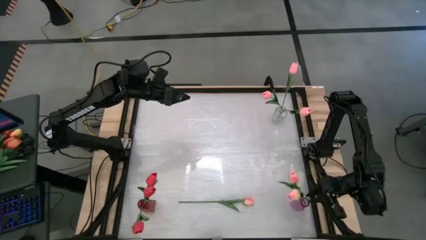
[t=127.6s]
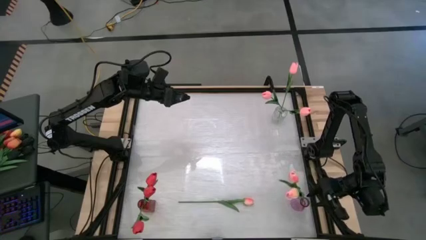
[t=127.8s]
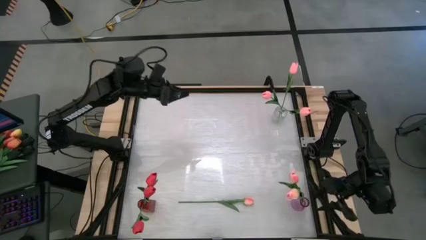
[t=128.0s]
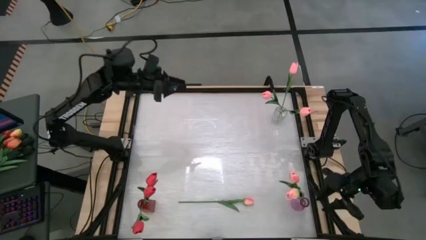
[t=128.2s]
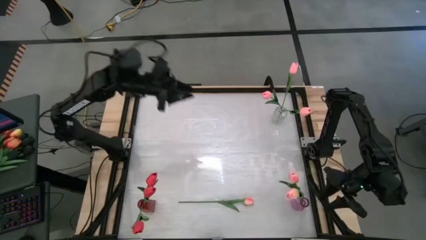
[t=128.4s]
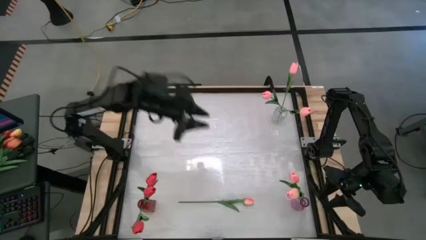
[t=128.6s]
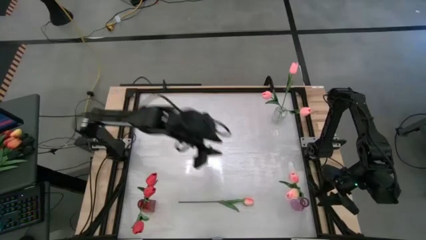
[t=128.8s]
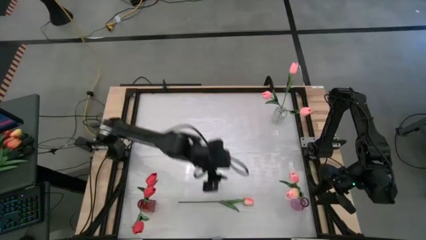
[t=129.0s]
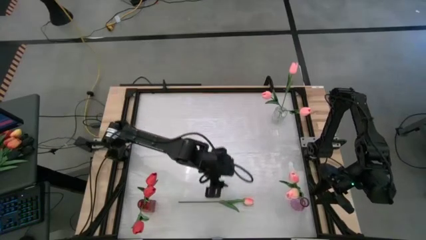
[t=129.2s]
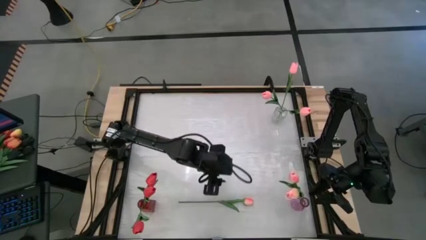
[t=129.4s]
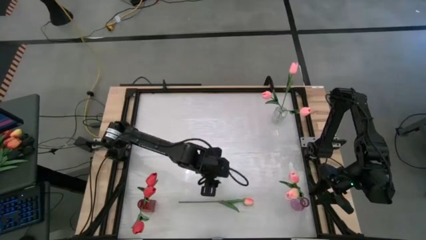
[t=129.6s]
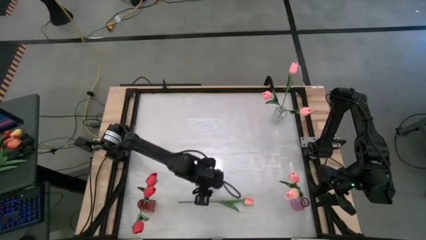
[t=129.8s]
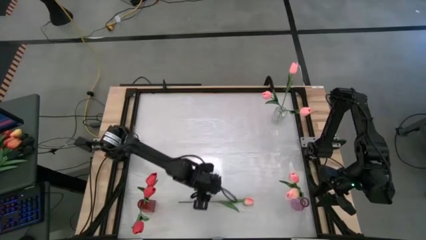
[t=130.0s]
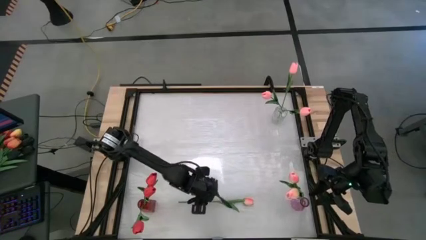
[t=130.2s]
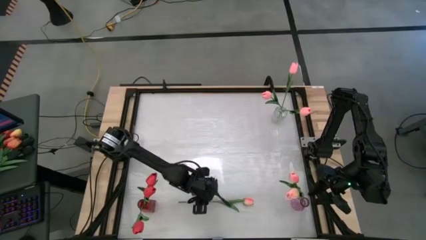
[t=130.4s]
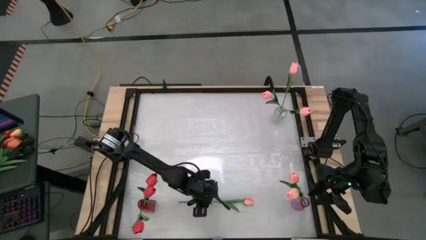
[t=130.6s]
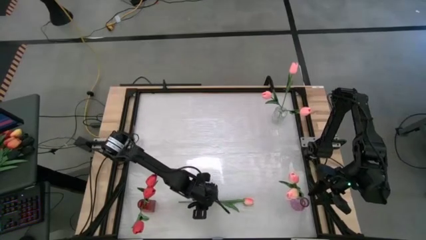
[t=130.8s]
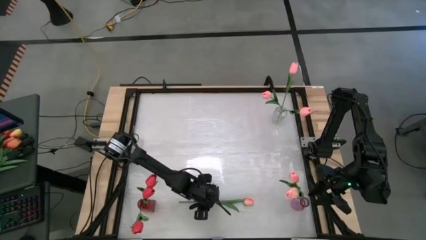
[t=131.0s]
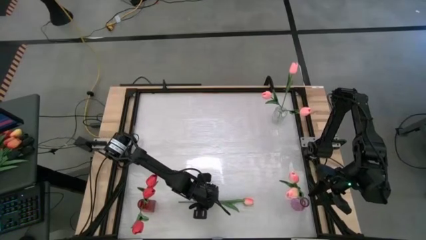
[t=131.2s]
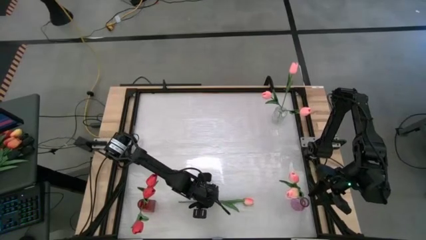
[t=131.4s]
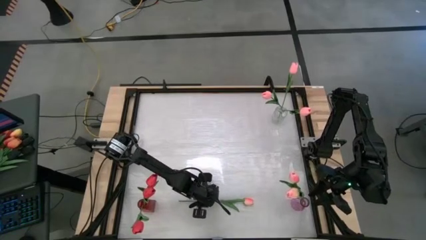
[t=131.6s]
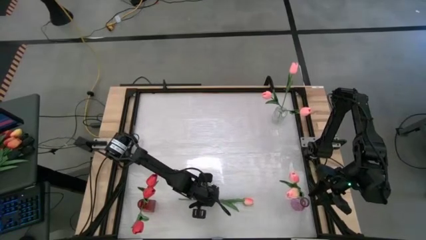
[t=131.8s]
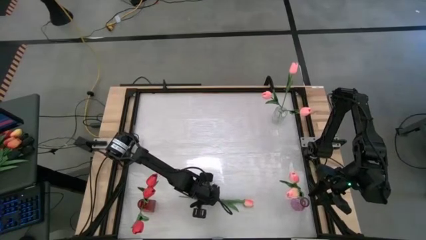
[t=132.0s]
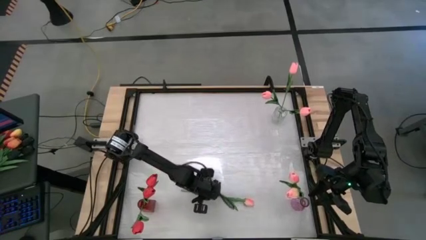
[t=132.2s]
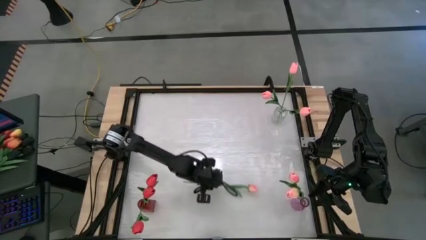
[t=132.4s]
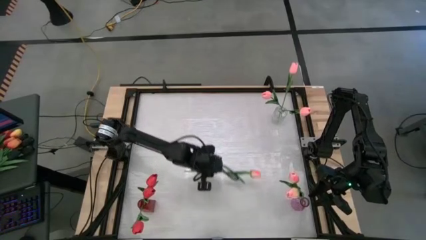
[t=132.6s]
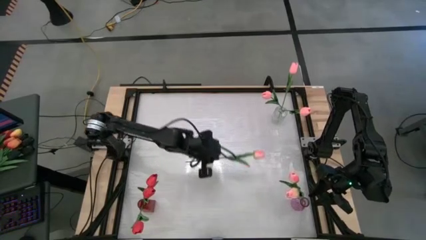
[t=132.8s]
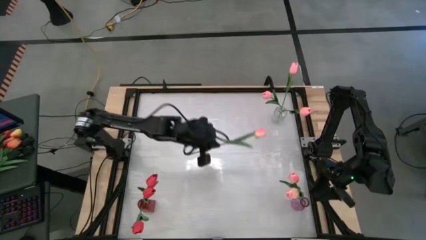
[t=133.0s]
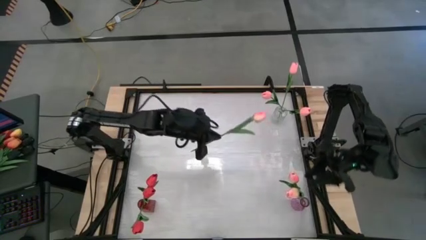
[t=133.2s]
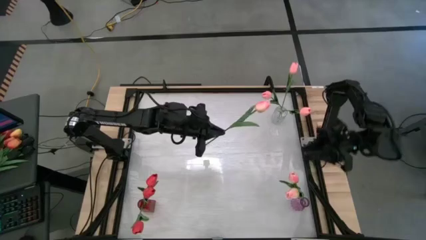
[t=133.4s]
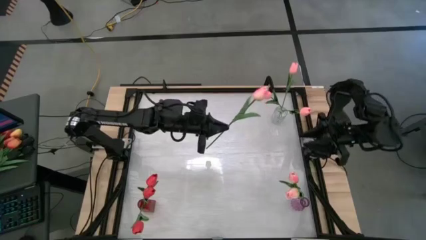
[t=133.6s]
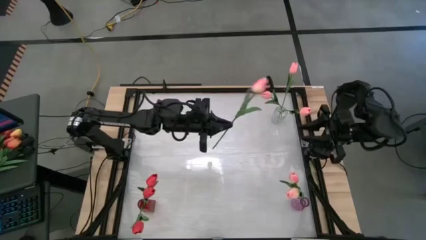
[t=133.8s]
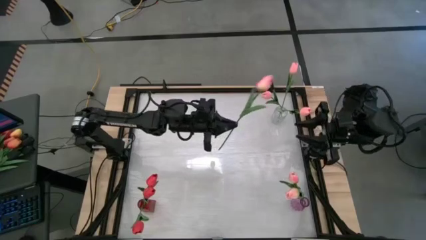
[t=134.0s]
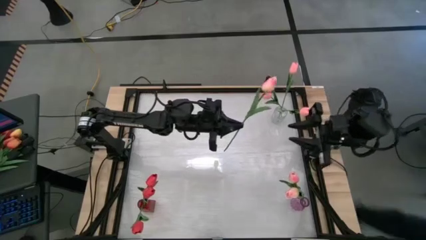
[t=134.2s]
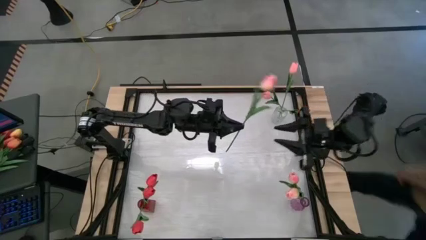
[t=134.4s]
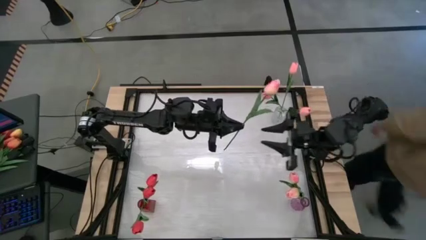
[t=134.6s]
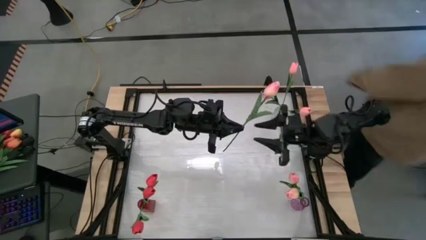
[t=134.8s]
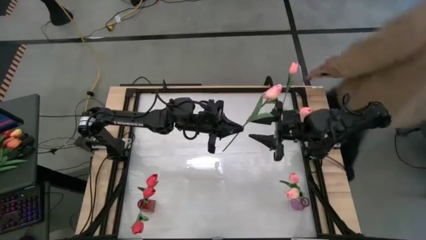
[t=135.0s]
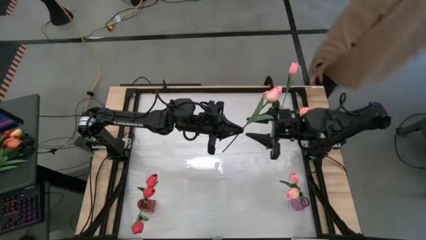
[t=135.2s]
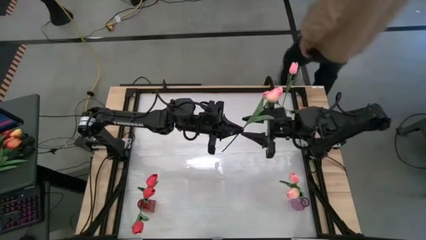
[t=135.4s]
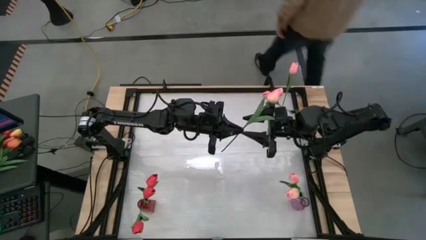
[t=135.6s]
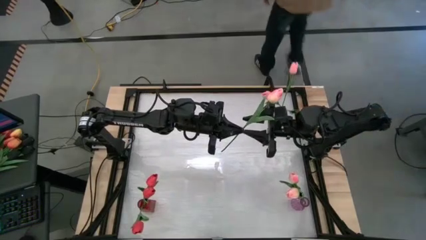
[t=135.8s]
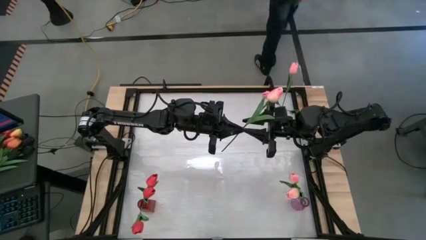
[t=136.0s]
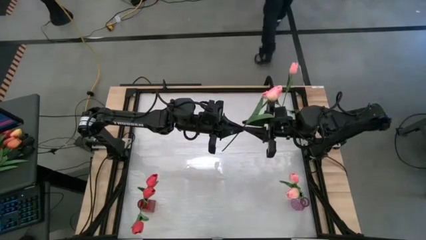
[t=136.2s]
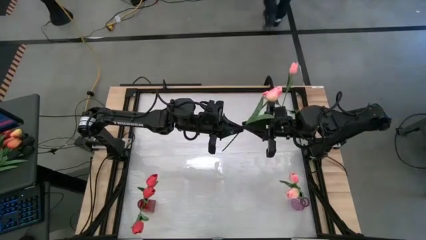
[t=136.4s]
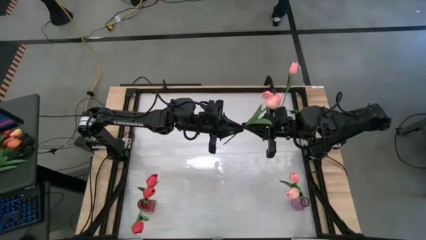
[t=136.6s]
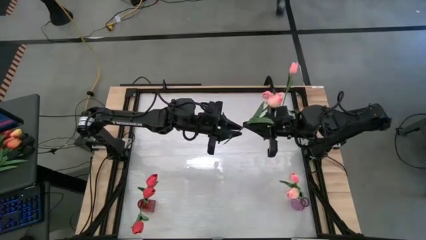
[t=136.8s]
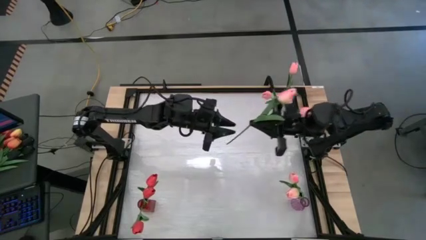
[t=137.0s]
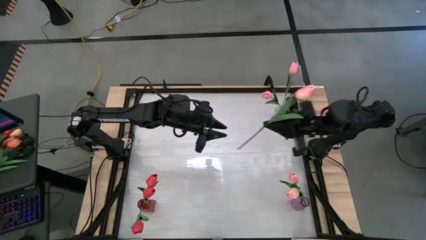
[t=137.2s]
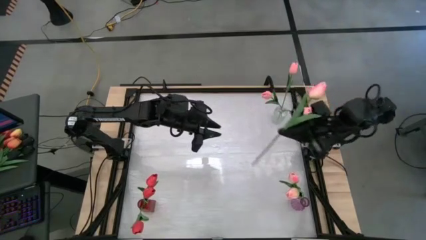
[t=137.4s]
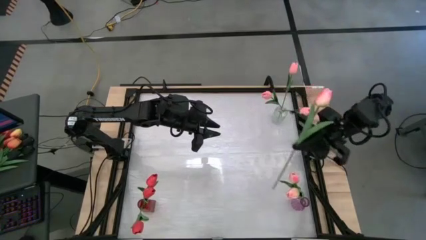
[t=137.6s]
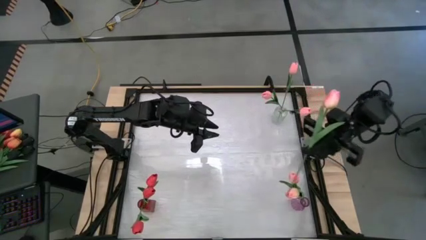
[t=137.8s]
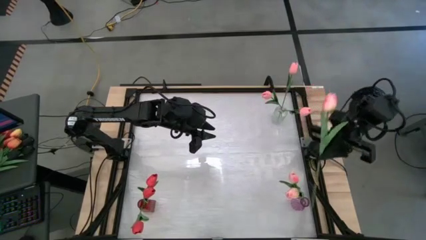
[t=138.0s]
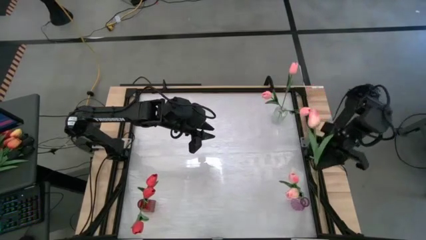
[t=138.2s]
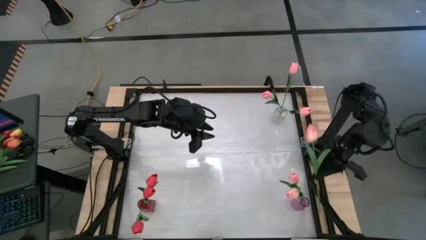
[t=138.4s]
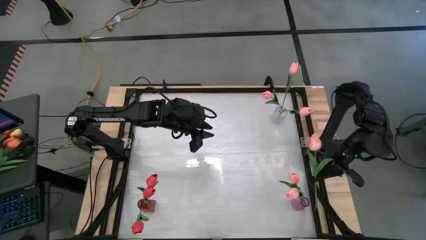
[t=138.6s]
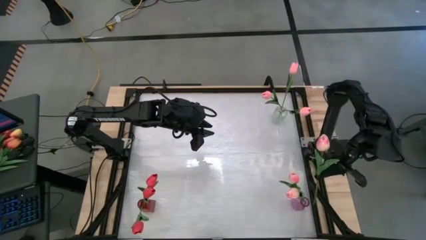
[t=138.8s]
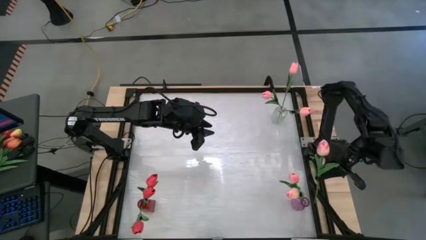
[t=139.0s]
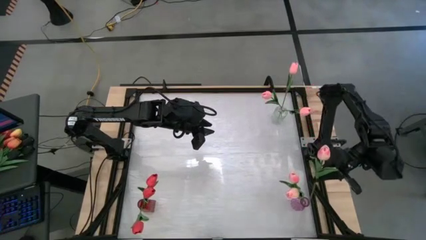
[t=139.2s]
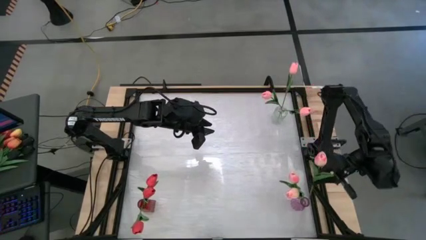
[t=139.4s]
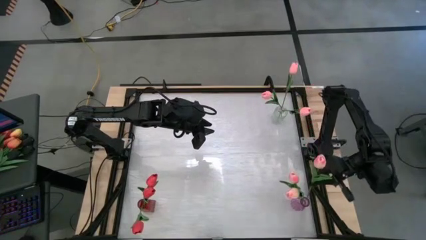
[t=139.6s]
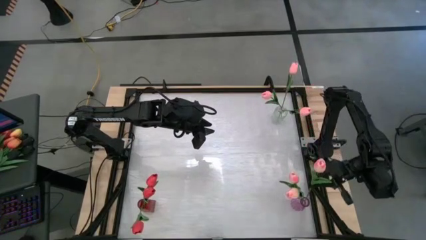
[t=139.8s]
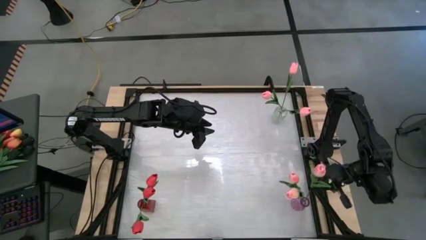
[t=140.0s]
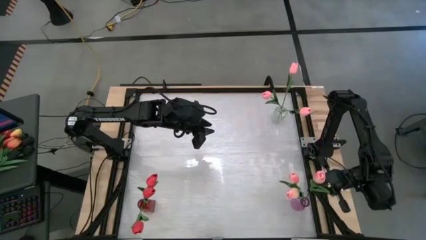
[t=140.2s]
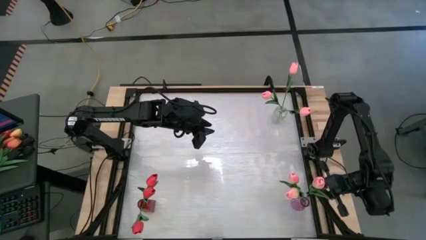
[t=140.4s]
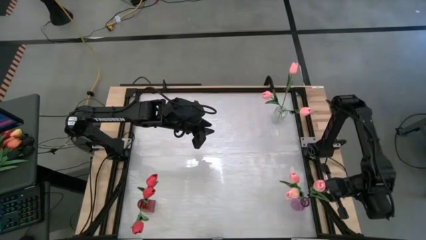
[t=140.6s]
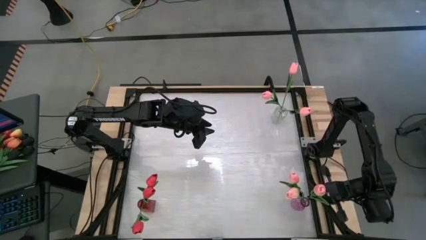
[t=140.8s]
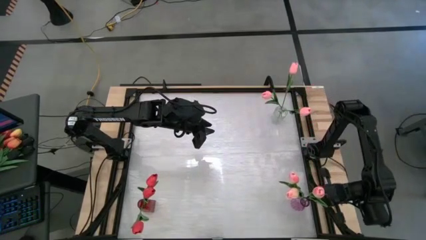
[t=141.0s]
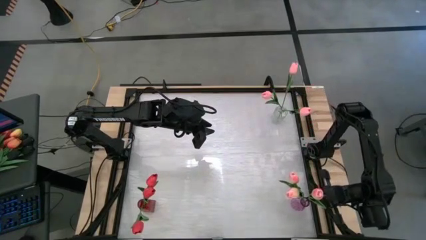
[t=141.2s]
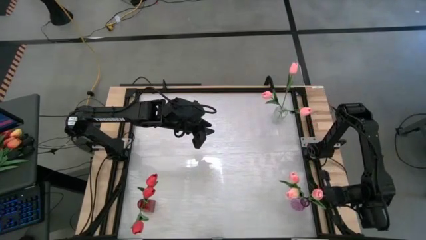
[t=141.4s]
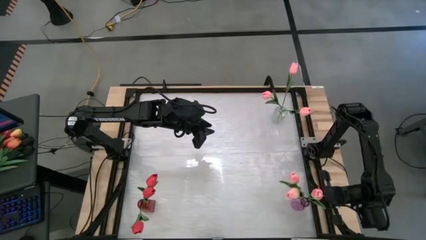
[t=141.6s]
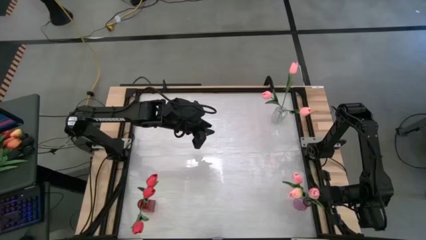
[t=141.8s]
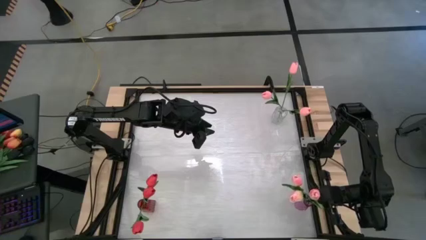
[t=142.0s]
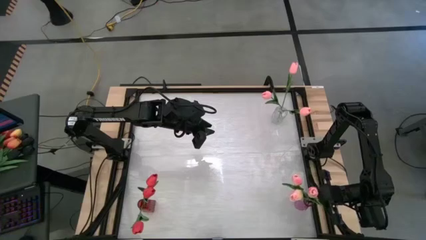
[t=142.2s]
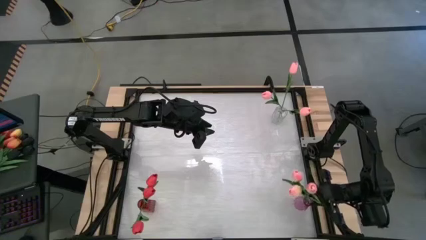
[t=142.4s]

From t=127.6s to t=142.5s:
Task: Sort flowers into vase by color
Put the pink flower in the pink vase
